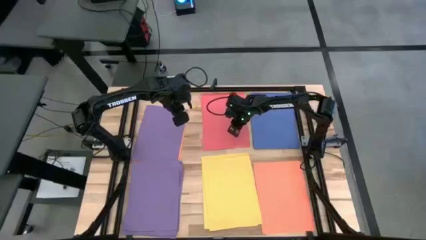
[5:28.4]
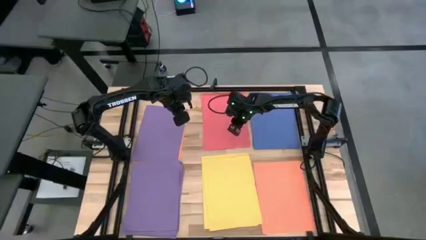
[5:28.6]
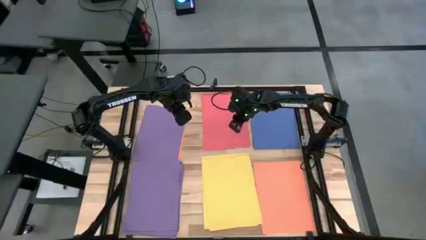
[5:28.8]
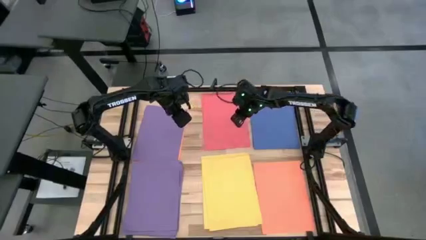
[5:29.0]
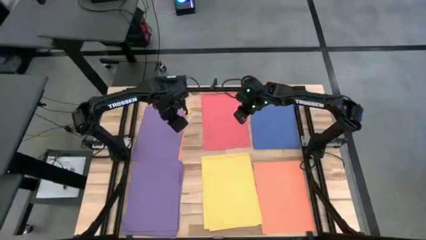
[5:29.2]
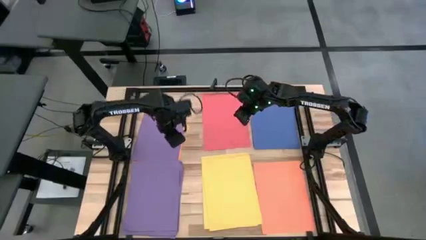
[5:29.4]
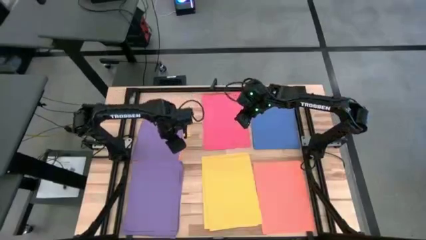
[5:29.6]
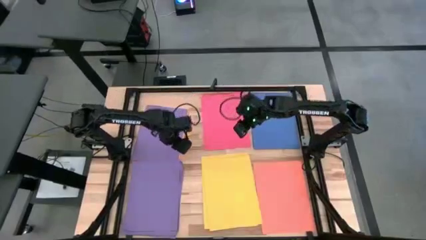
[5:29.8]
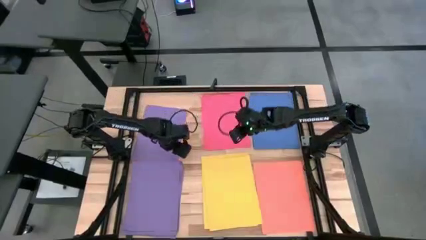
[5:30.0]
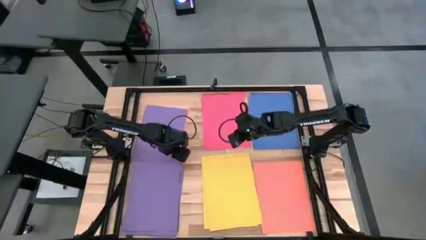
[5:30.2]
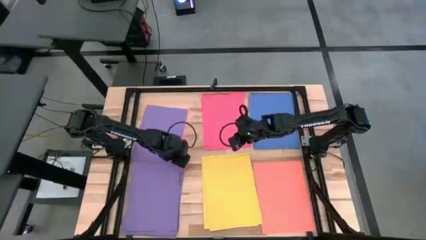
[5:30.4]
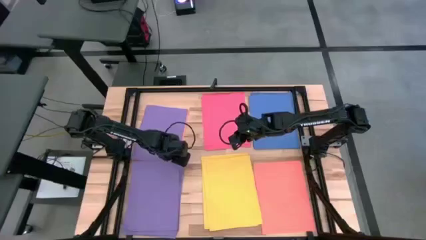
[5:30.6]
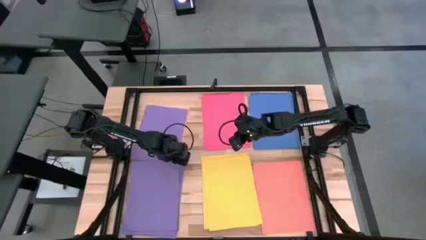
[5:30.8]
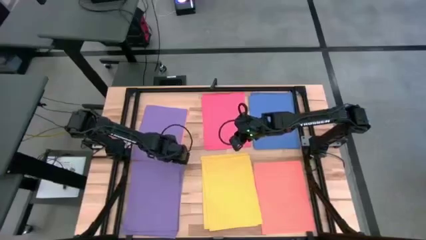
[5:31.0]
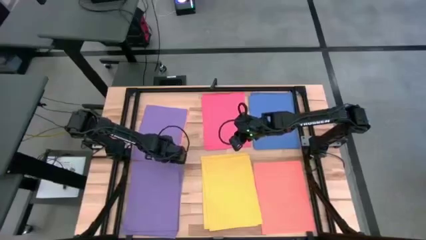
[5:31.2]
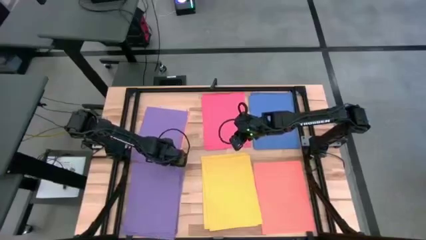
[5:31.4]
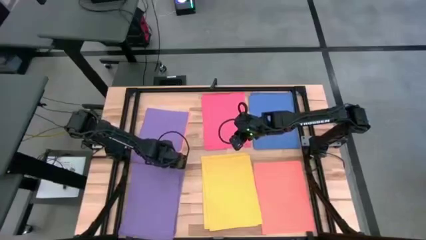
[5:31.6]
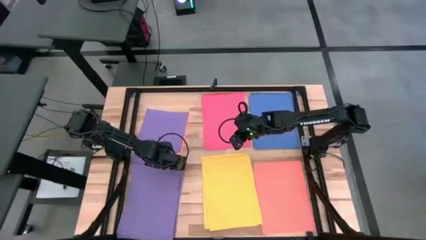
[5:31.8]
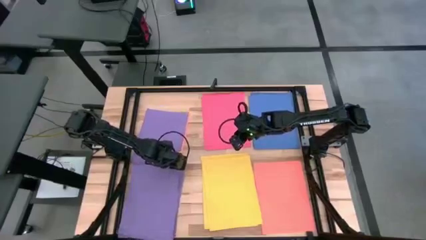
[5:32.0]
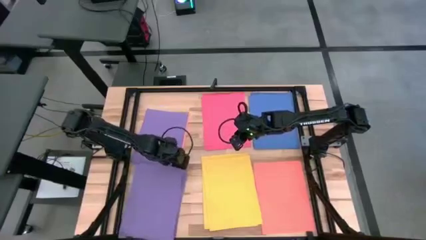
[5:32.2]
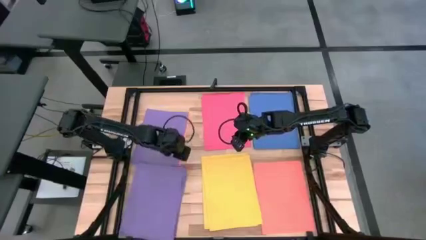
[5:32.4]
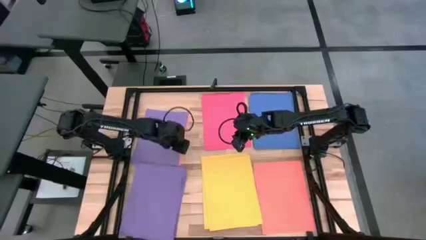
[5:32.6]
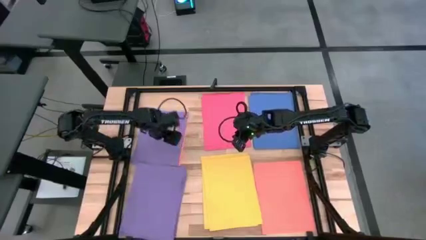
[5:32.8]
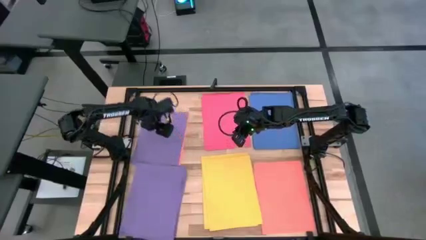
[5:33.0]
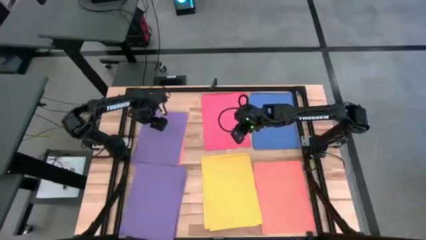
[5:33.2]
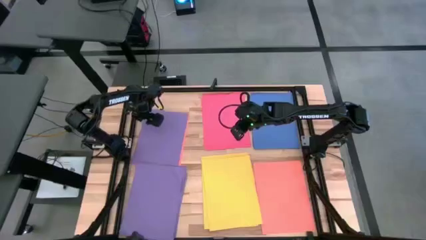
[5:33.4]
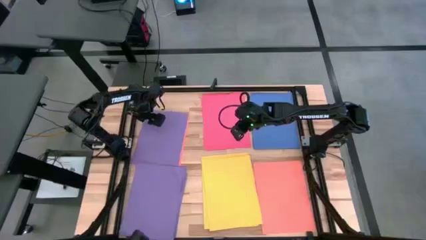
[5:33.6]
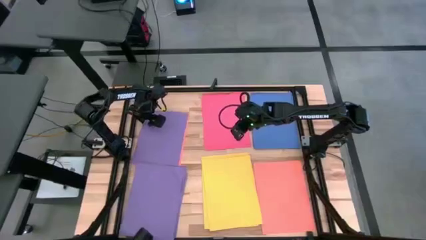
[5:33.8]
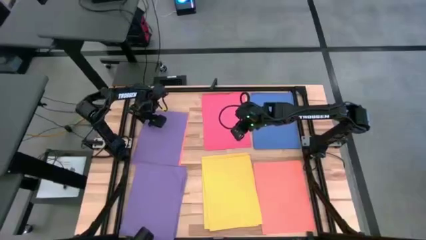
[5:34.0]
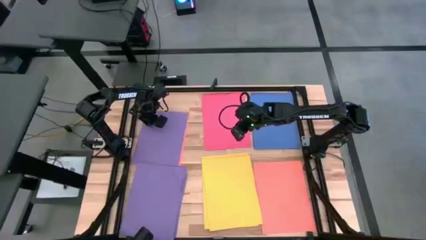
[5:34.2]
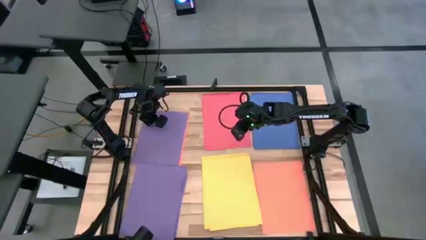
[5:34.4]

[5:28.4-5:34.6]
Task: Organize paper
Stack the purple paper on top of the purple paper

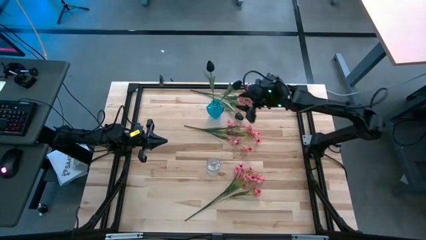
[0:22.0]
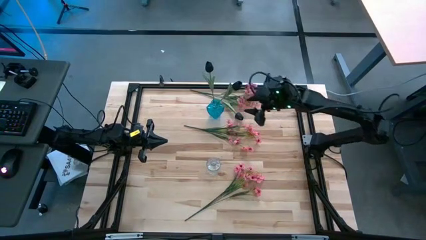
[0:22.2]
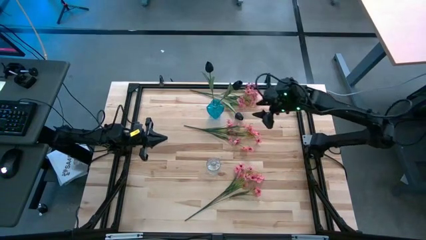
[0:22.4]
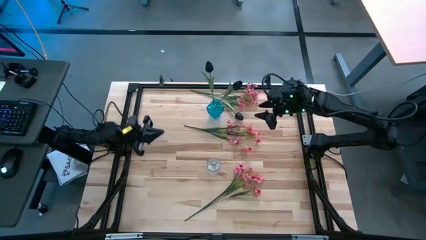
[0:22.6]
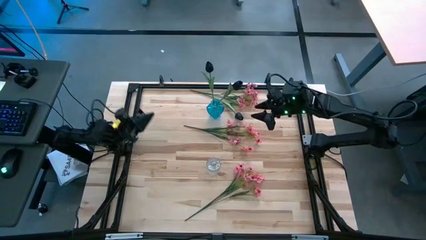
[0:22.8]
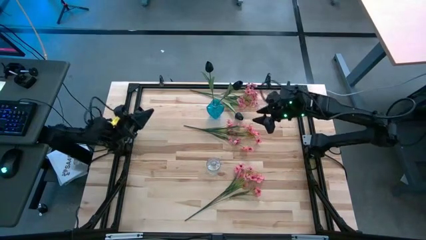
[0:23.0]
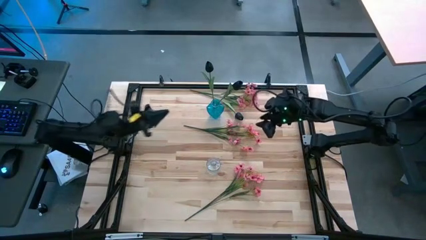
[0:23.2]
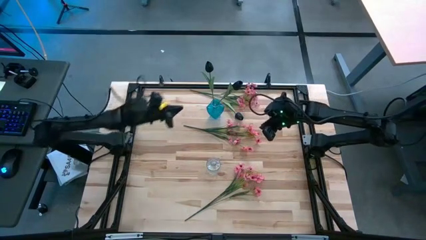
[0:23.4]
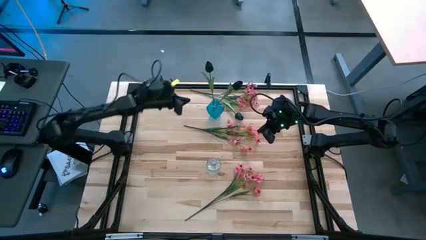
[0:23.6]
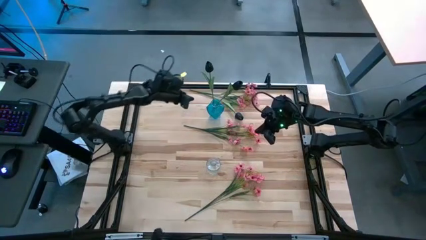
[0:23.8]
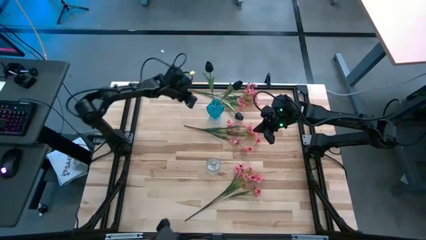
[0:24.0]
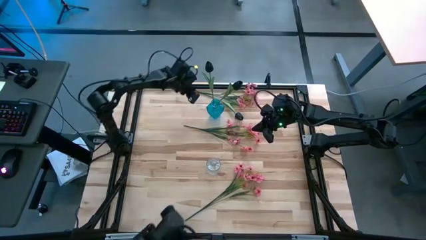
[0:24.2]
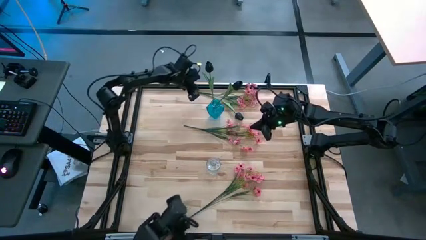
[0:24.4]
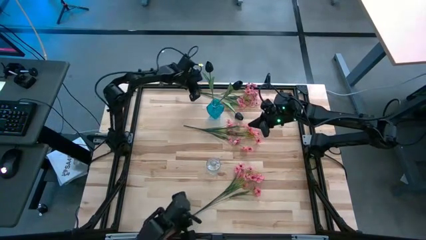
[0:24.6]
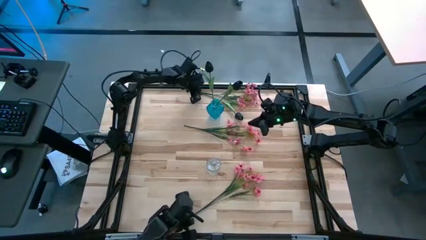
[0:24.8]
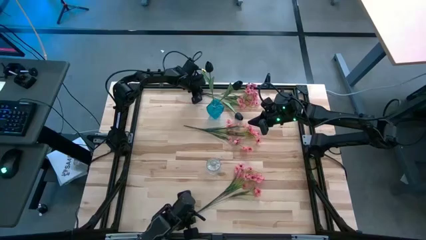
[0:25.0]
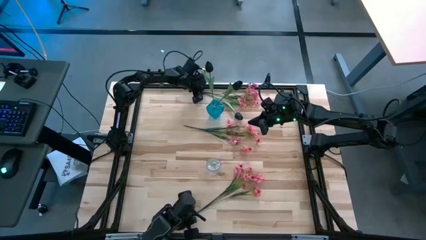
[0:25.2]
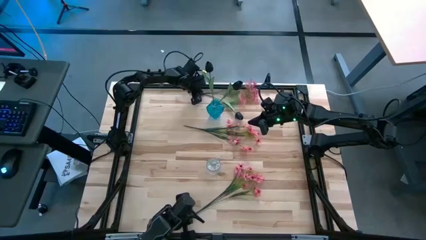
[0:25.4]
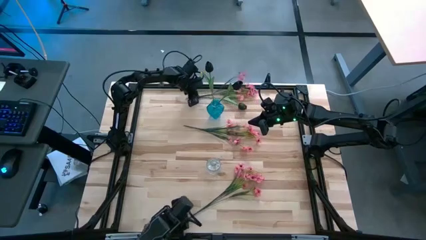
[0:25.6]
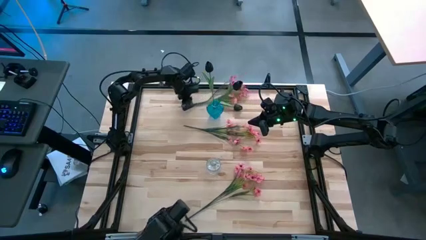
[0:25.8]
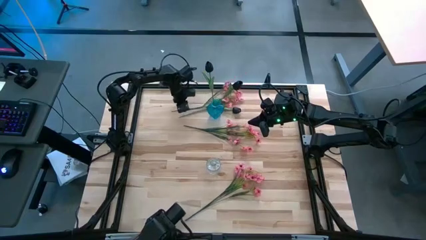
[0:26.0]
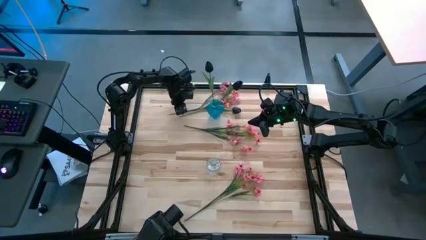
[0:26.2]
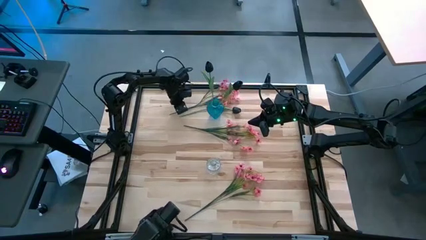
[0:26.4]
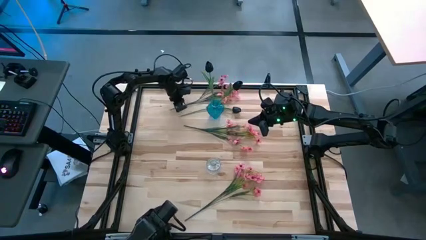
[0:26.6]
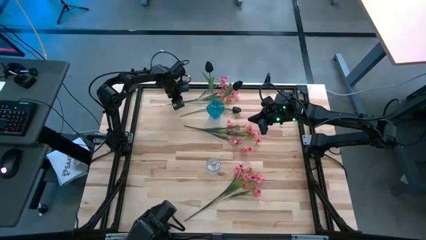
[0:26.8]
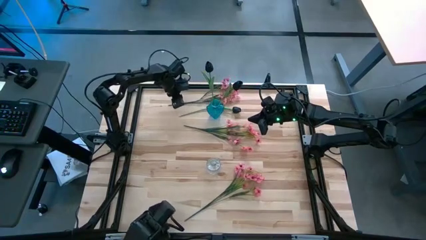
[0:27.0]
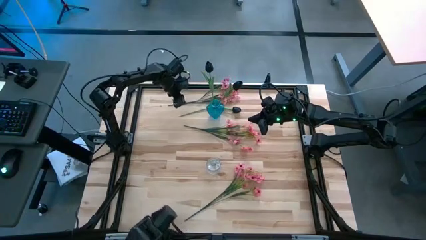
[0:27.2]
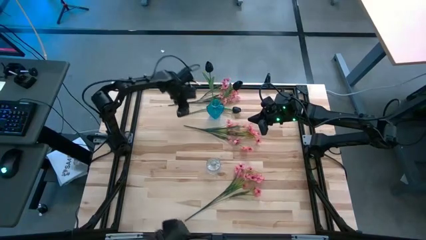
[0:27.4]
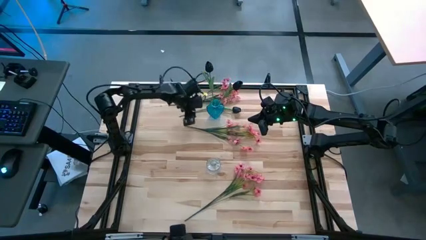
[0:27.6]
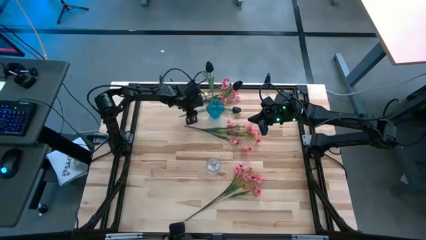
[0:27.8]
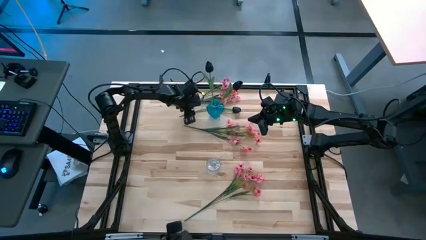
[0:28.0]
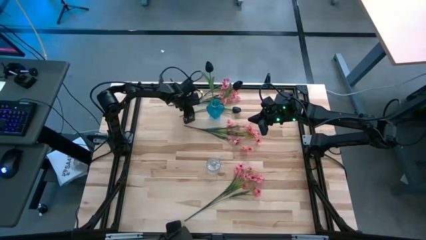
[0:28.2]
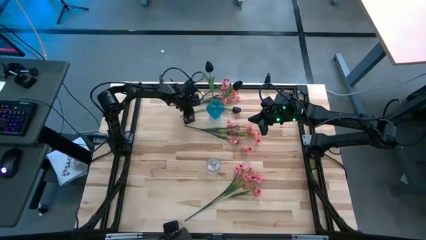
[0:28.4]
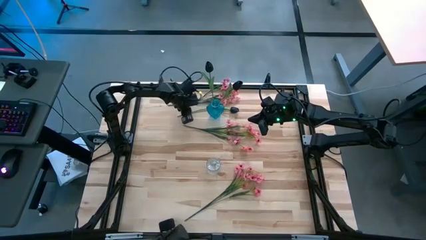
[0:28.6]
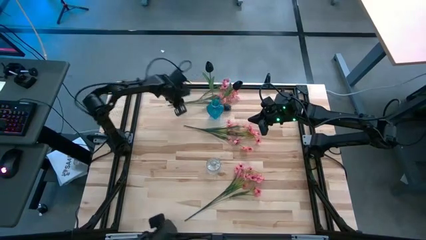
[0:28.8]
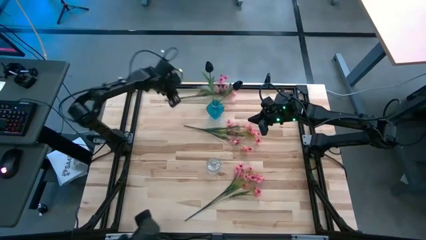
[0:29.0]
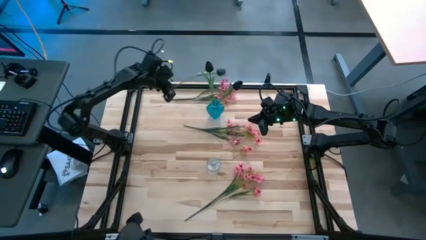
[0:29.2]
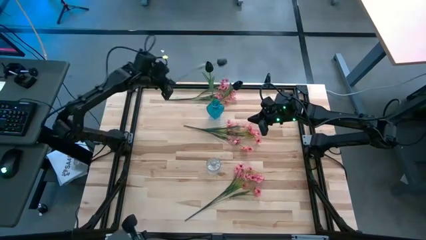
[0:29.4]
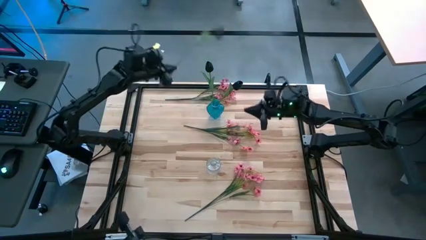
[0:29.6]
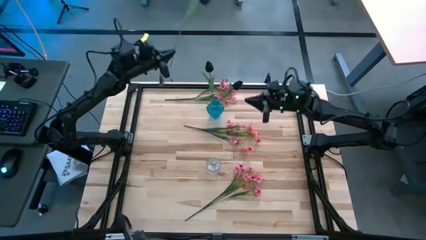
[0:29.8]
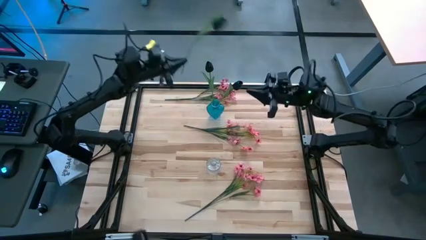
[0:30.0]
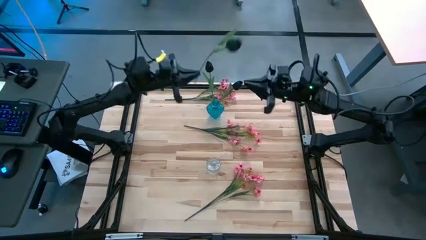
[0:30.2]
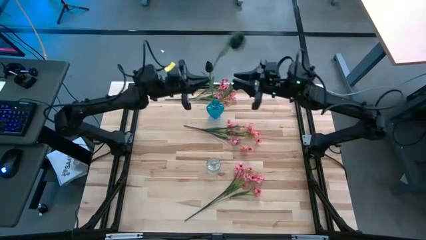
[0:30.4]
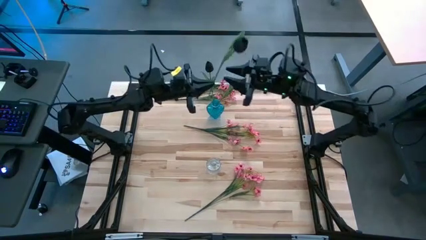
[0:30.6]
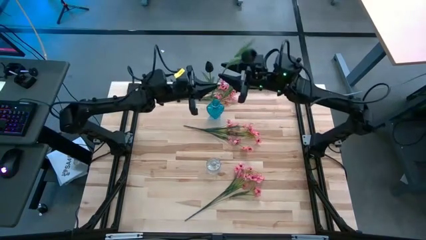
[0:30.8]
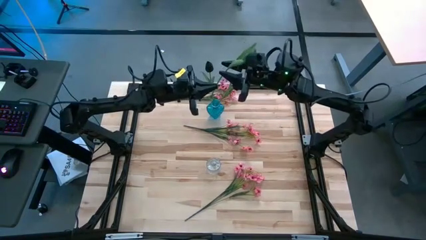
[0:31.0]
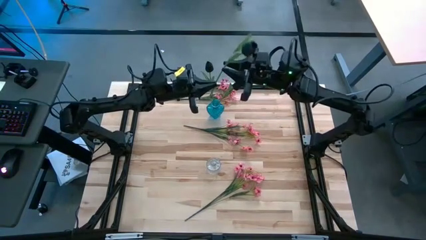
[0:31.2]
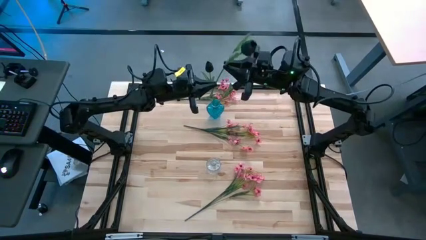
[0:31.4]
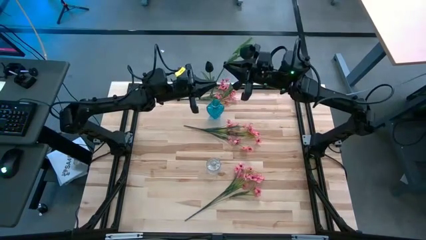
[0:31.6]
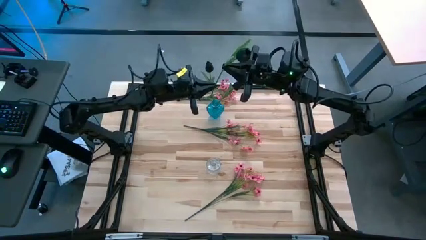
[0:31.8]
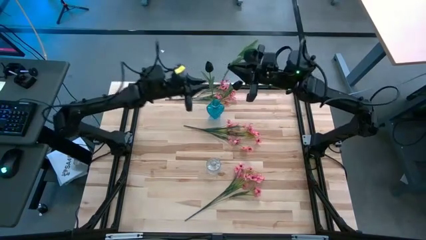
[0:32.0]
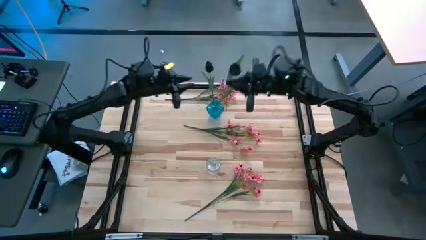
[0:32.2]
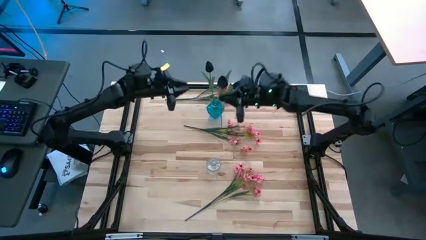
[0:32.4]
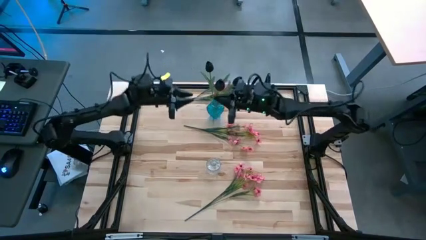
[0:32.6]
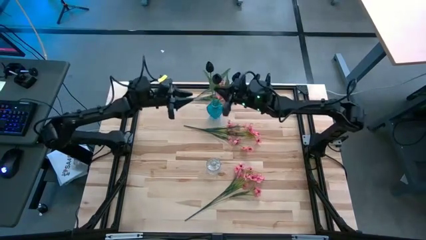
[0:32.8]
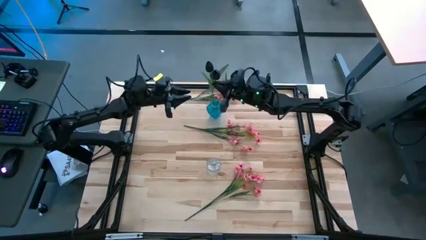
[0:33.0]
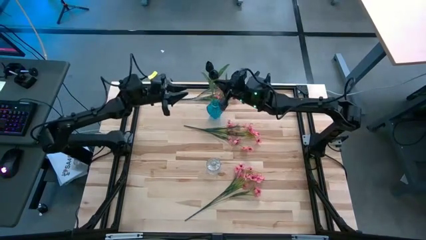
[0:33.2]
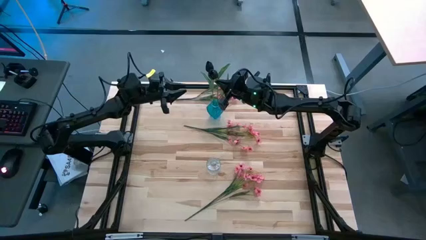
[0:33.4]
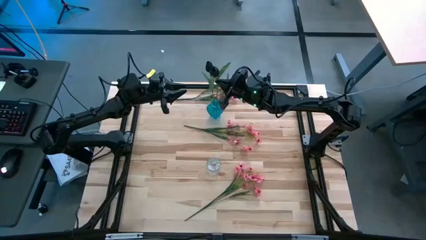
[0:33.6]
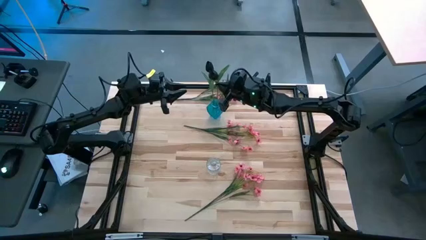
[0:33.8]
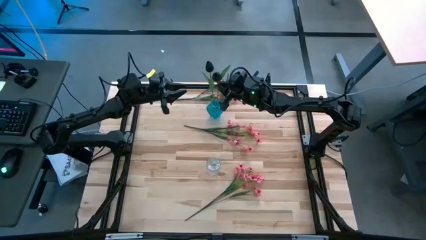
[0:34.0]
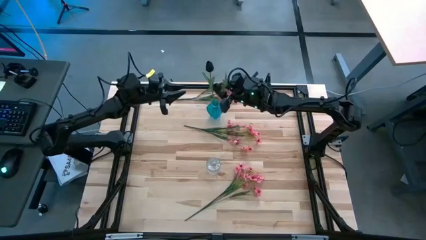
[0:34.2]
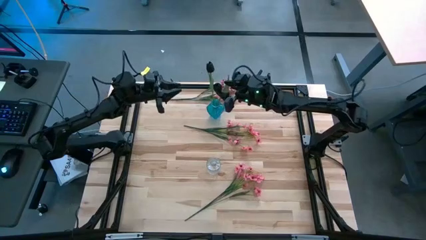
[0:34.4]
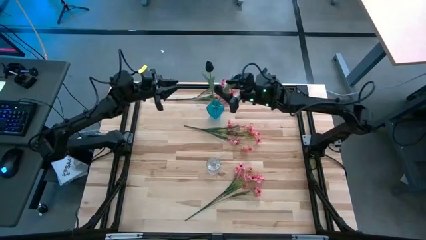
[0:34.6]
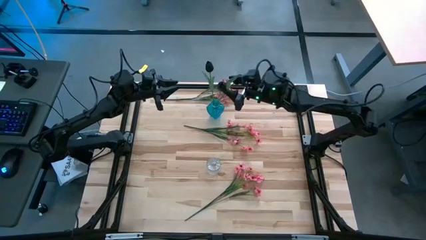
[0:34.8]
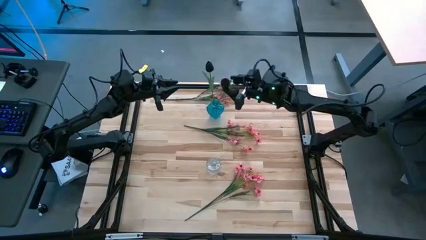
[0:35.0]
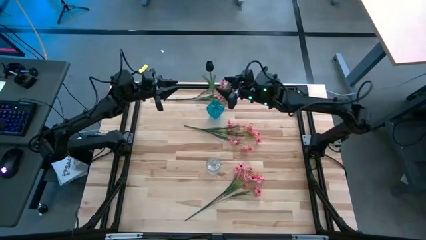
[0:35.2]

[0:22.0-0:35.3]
Task: Sort flowers into vase by color
Put the black flower into the blue vase
